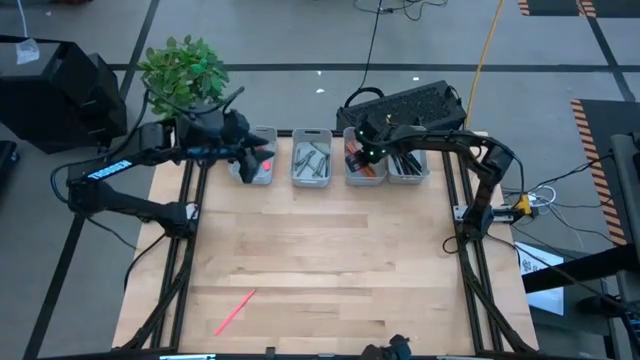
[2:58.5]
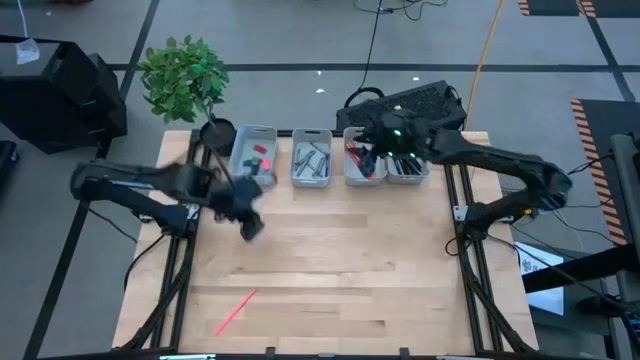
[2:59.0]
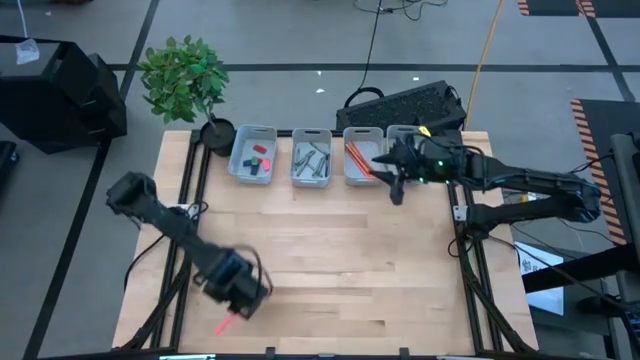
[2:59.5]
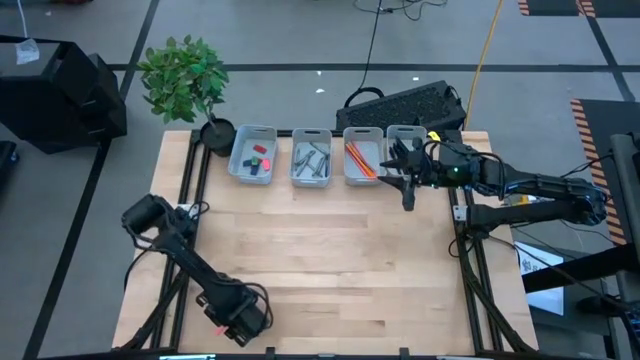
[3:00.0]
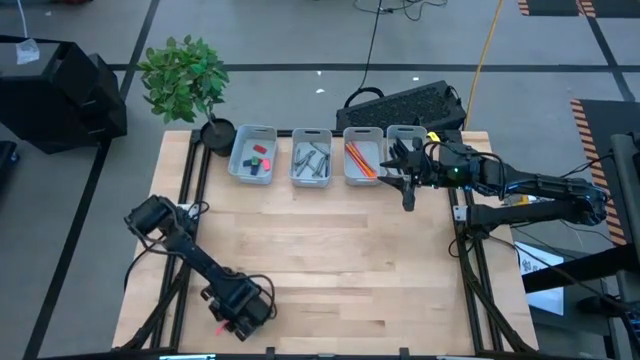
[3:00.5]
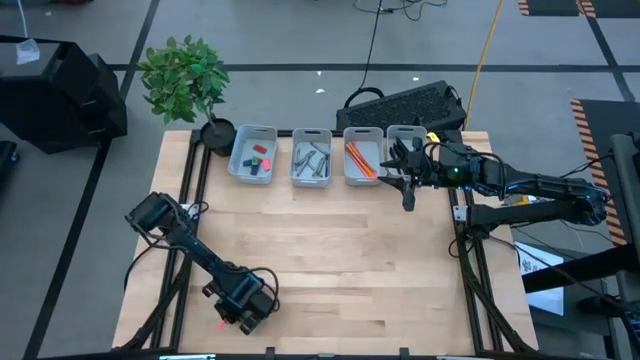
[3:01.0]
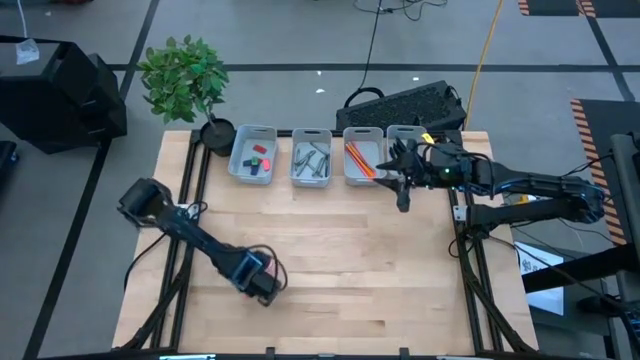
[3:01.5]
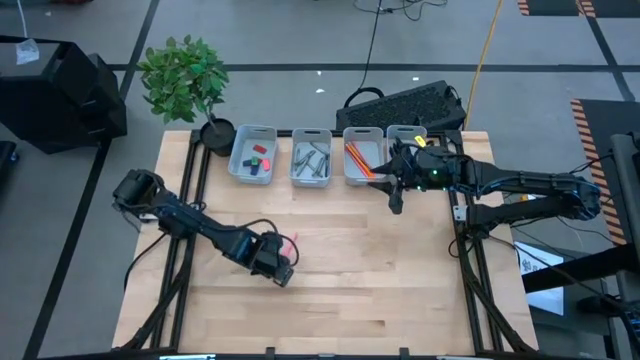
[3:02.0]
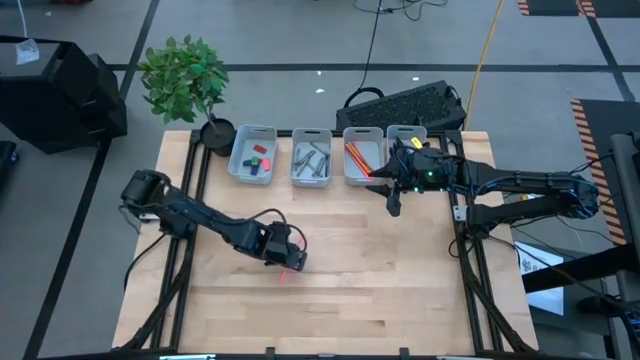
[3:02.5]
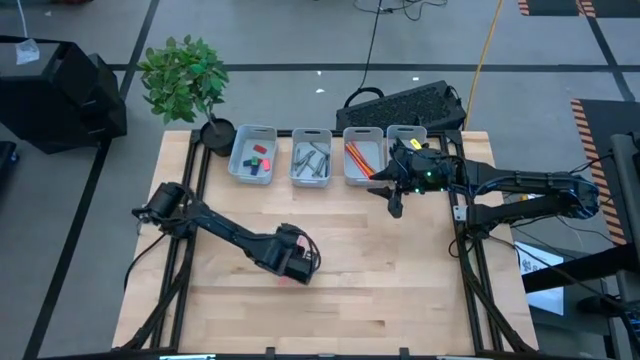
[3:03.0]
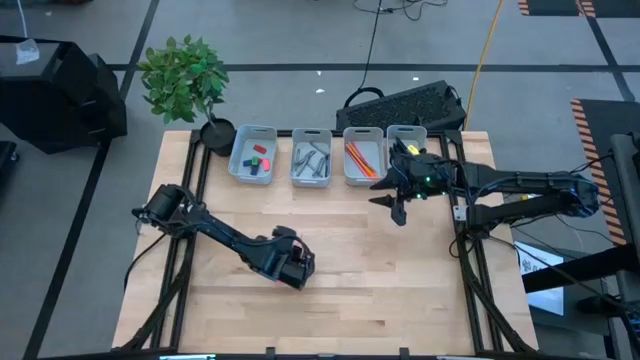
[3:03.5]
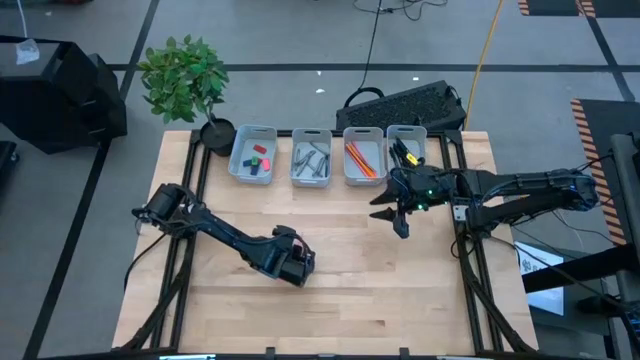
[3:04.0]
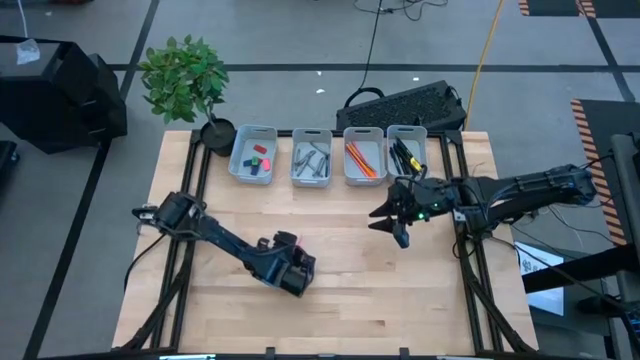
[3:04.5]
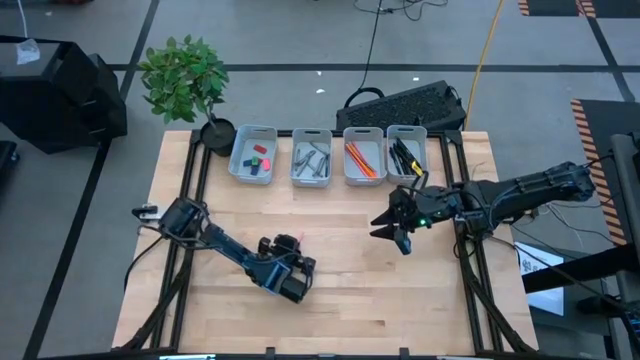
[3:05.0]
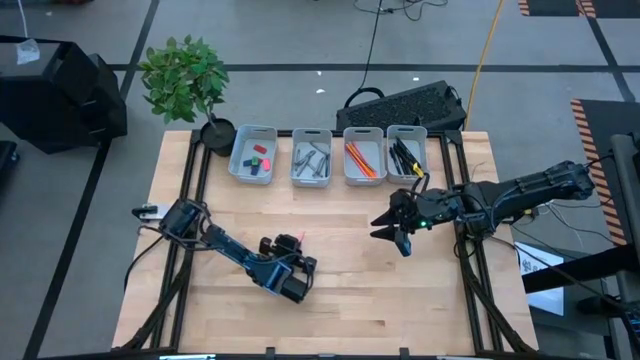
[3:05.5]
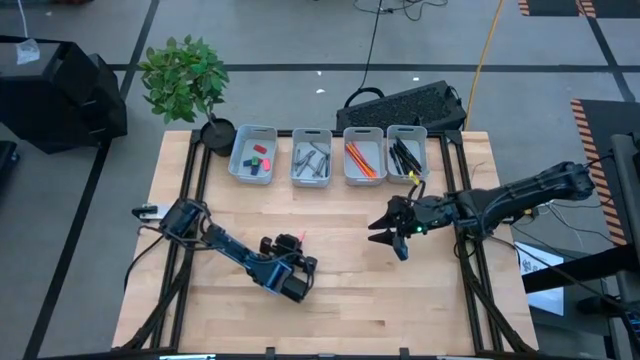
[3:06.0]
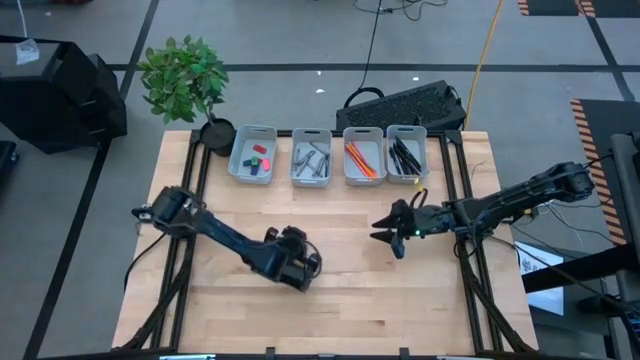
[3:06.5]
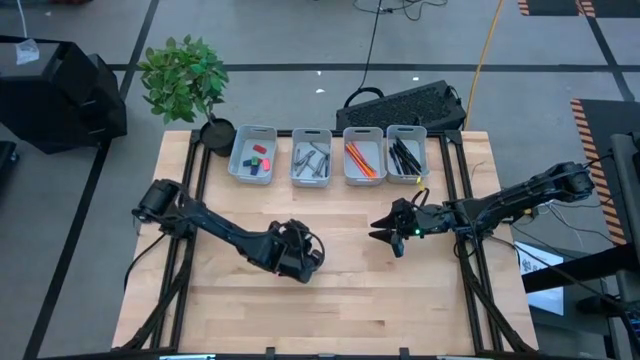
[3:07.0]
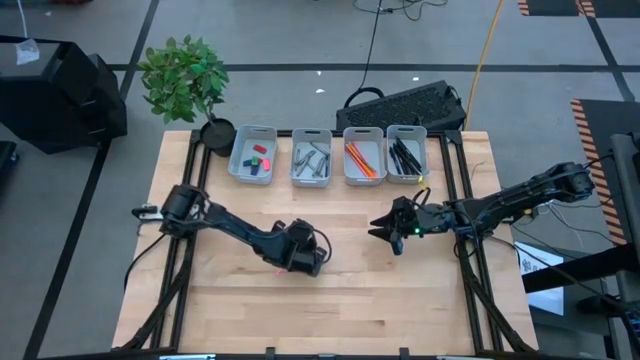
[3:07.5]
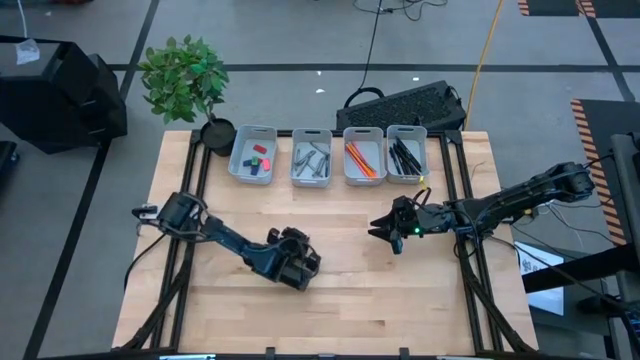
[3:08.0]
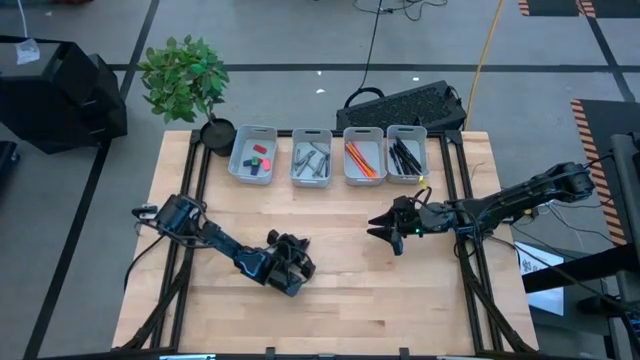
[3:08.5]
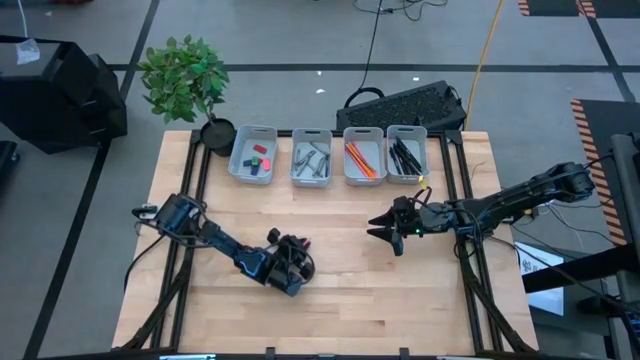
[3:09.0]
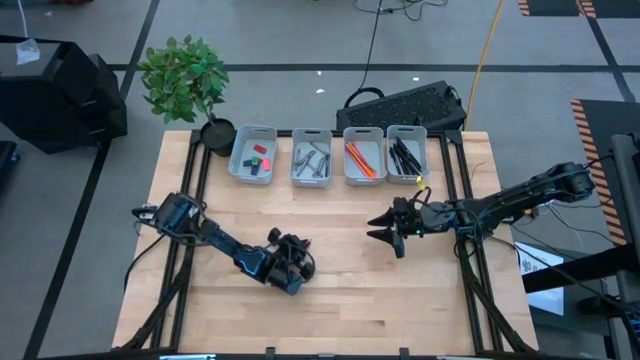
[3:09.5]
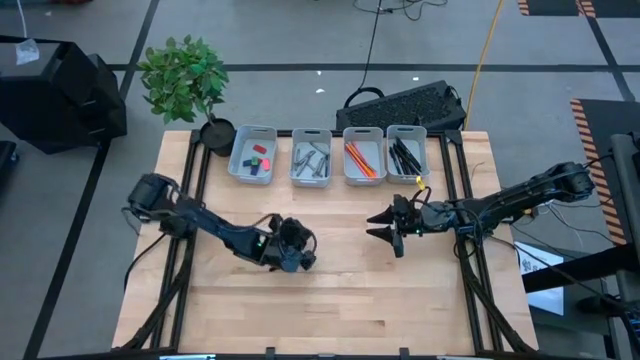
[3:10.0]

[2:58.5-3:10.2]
Task: Sort crayons/erasers/pens/pencils in bins
Put the pink pencil into the middle right gray bin

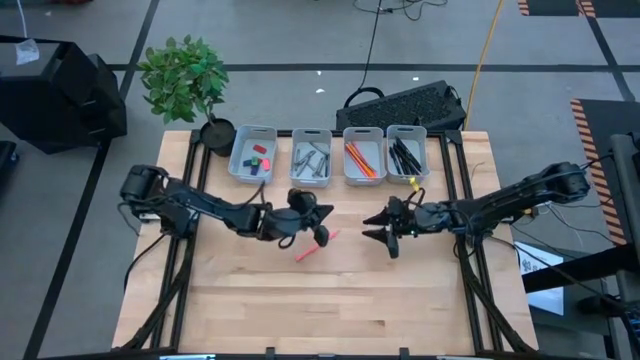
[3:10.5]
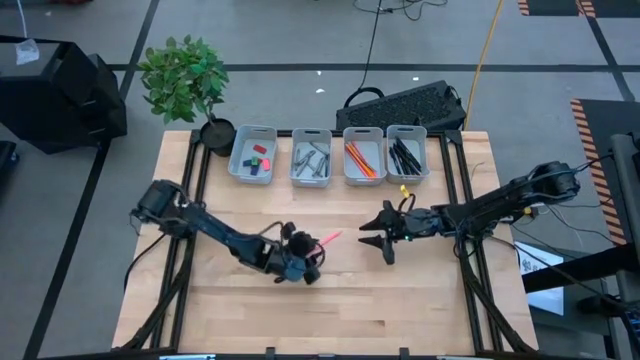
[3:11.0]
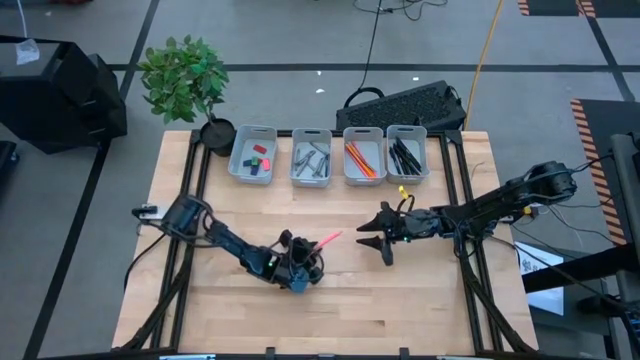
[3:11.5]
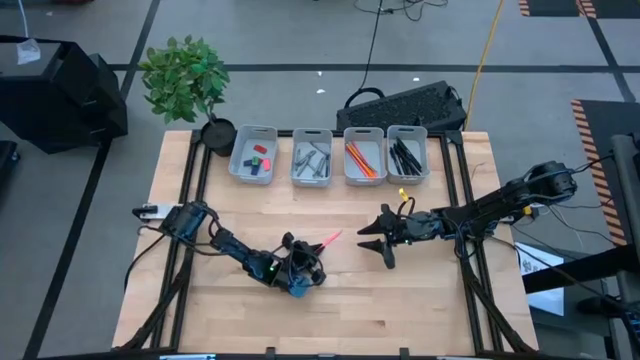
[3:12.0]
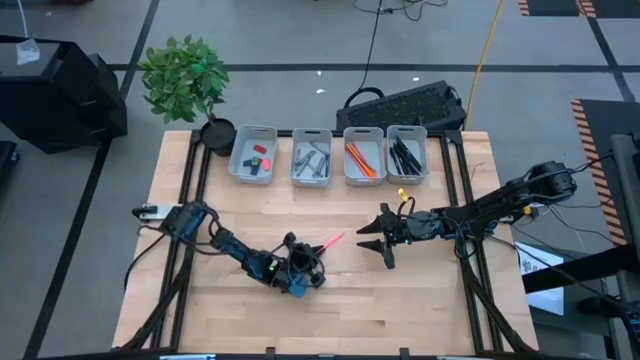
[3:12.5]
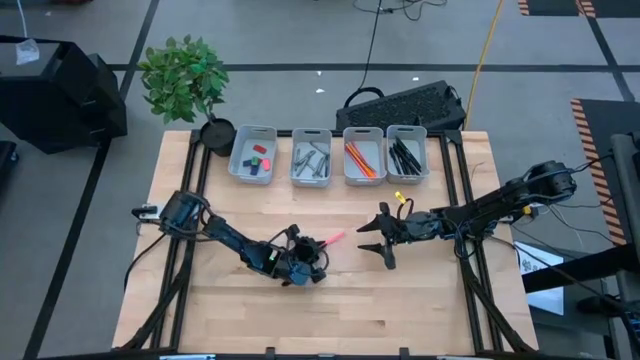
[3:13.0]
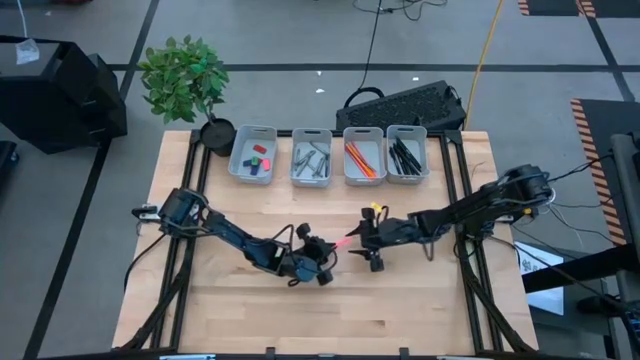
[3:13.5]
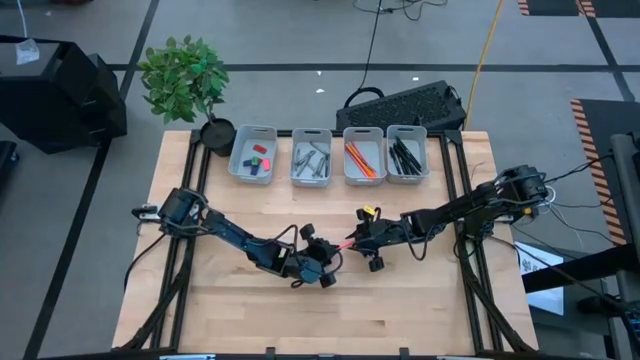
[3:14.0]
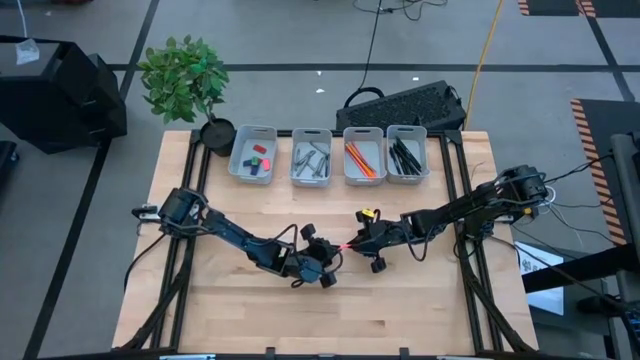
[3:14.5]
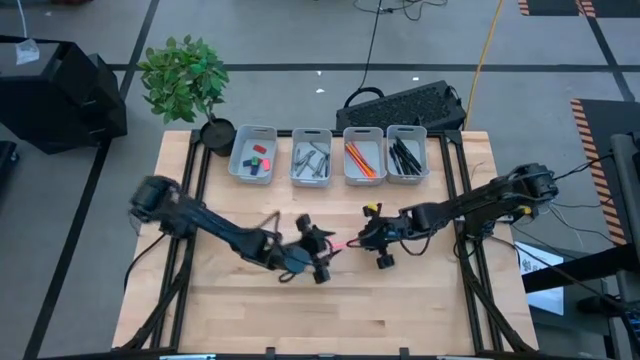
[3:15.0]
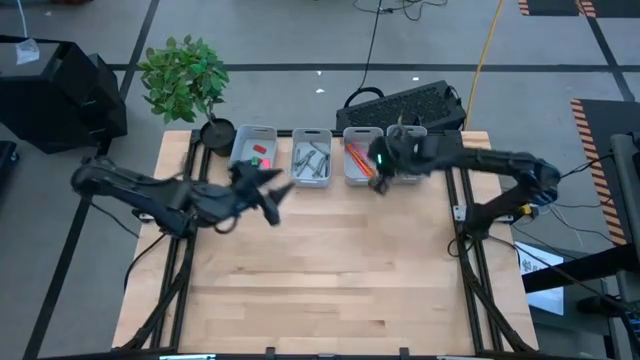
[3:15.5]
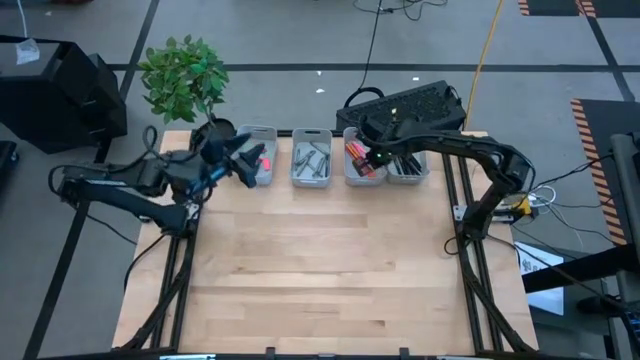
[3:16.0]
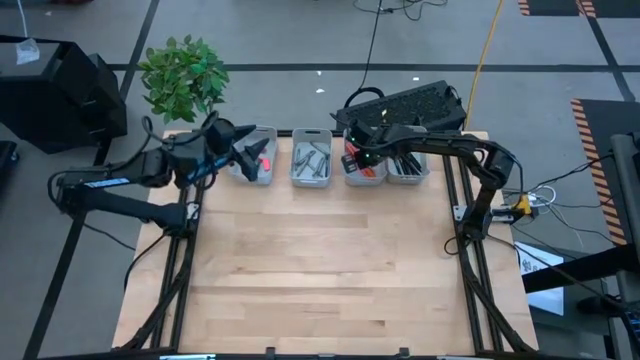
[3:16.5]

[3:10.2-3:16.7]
Put the pink pencil into the middle right gray bin

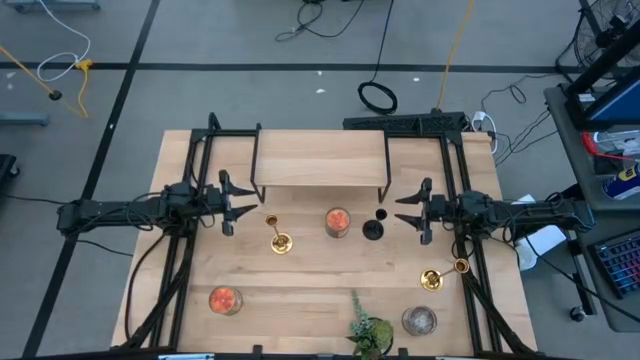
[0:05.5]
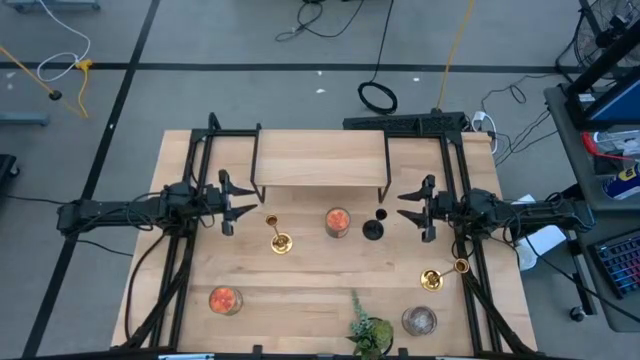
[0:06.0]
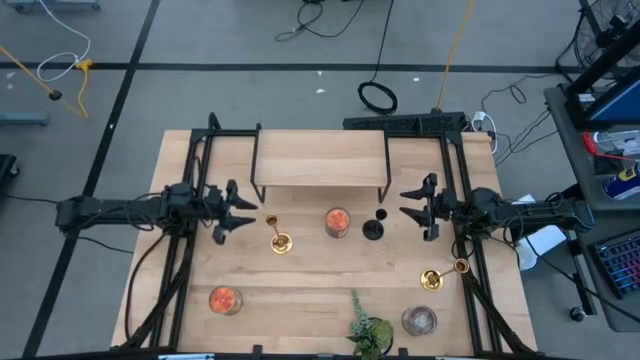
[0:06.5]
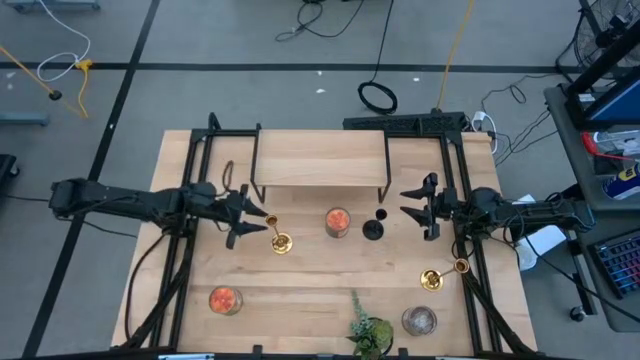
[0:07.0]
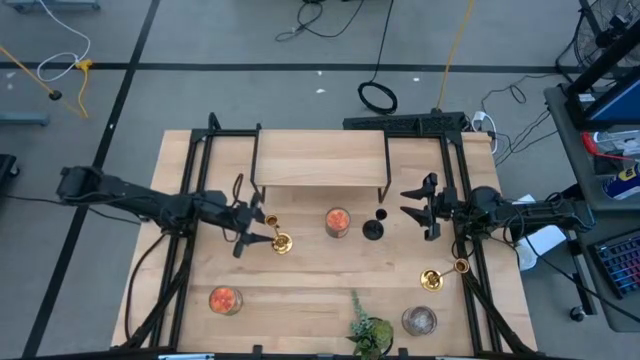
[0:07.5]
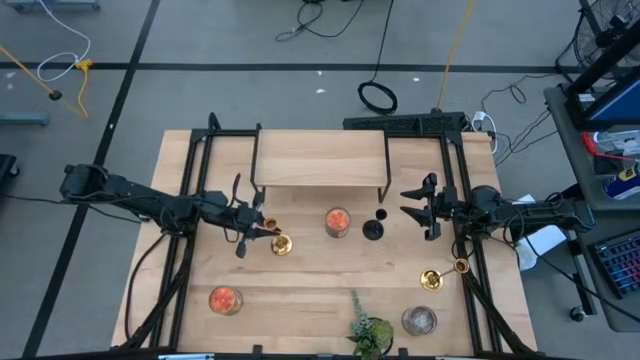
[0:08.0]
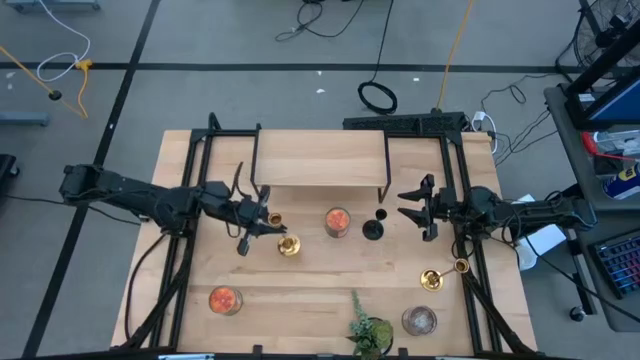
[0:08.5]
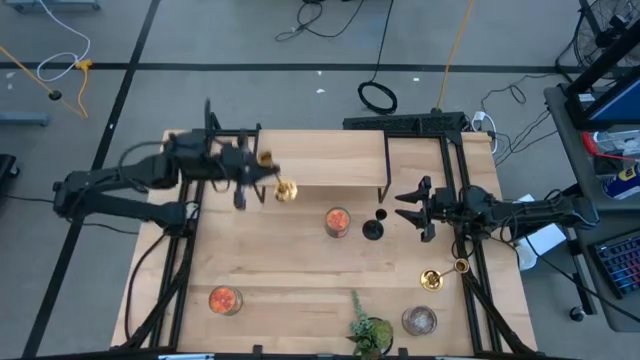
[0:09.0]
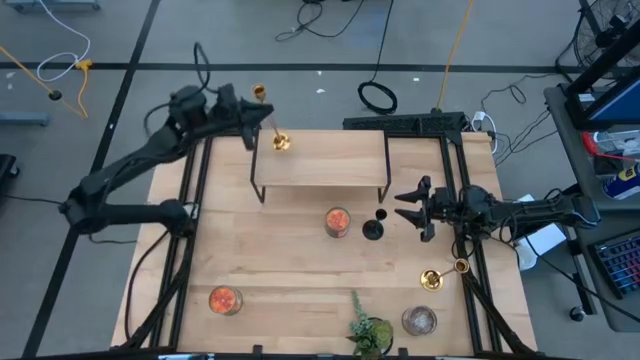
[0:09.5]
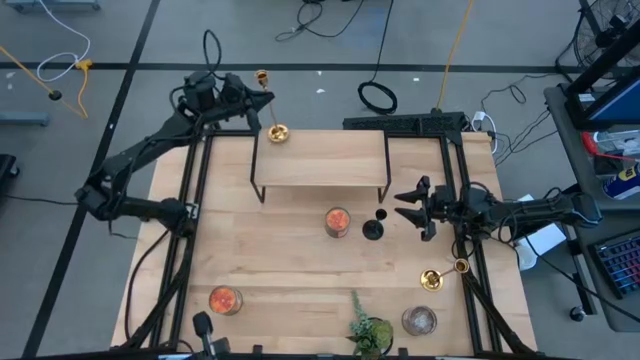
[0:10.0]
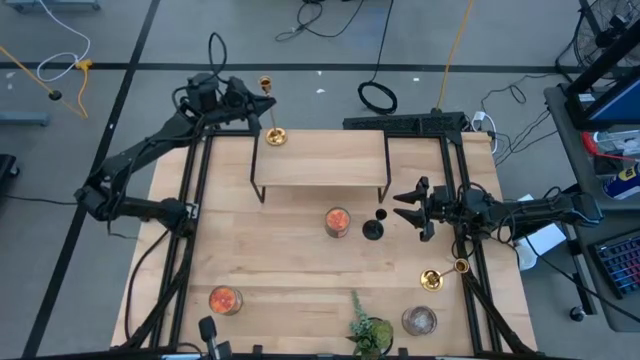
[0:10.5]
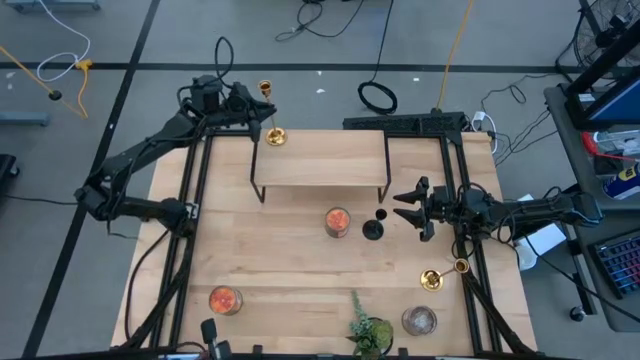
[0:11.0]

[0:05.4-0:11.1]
Task: Pick & Place candle stick holders
Put the left gold candle holder on the shelf
